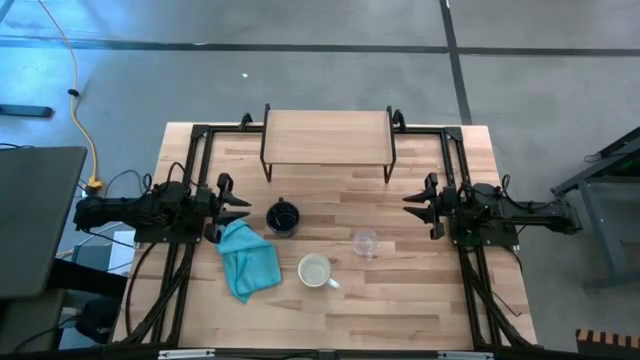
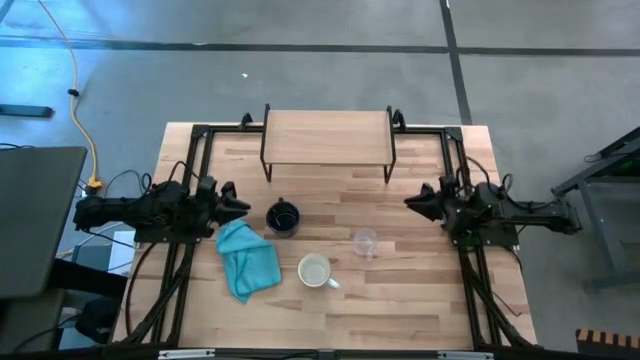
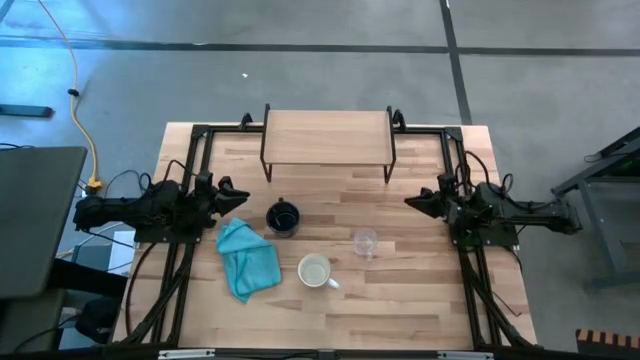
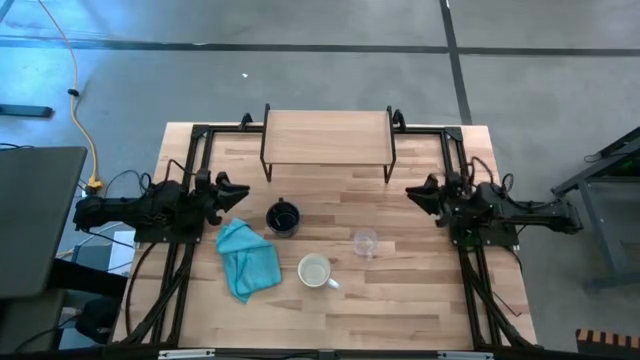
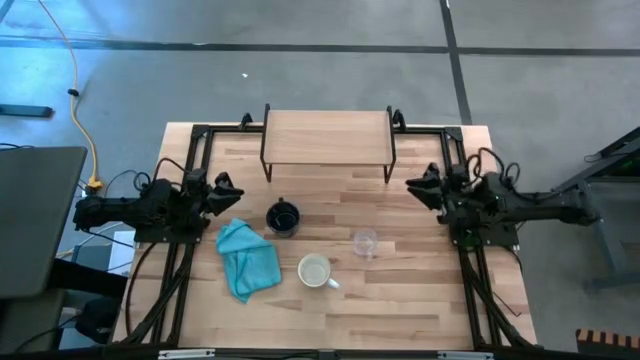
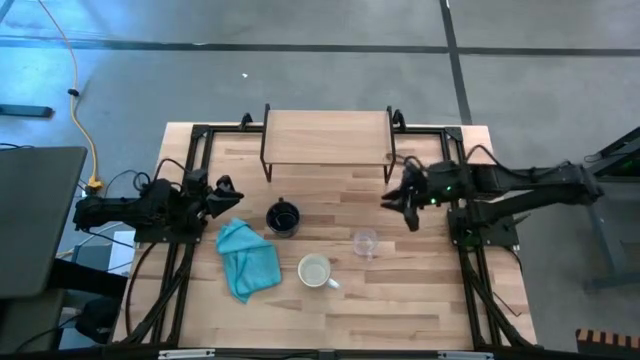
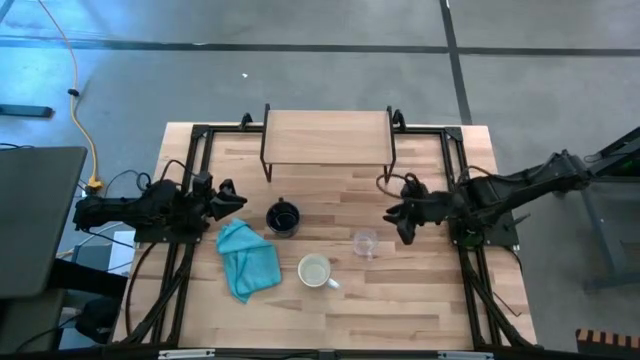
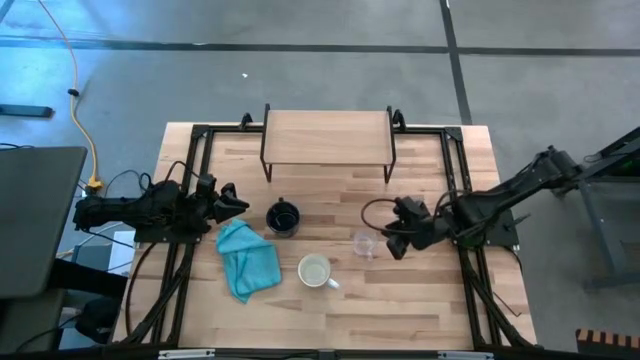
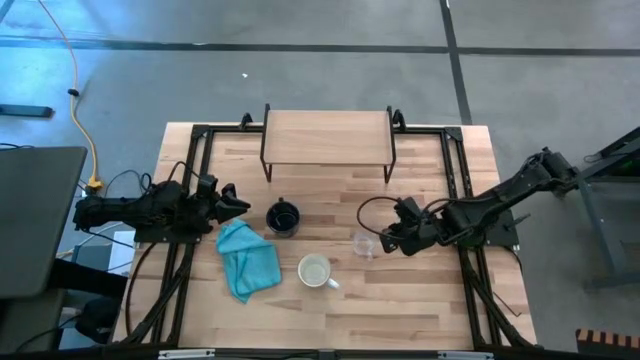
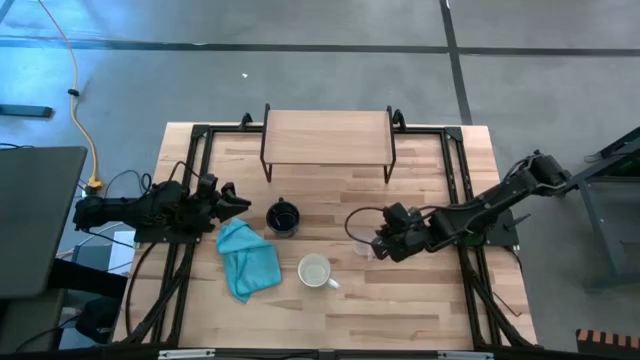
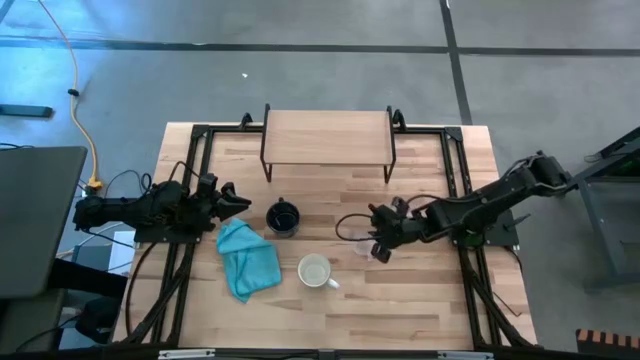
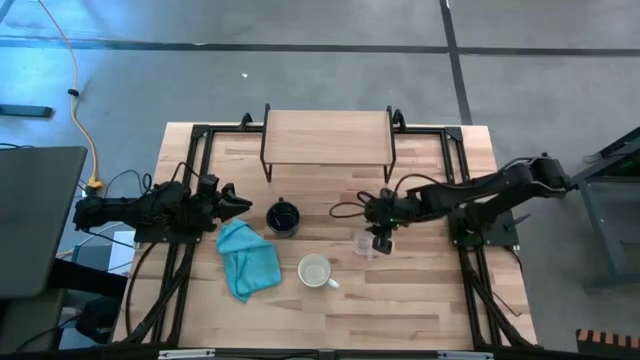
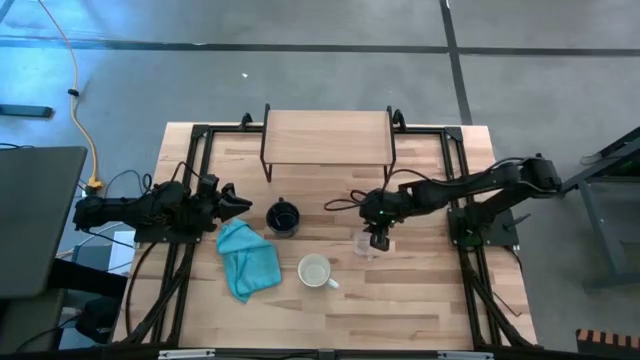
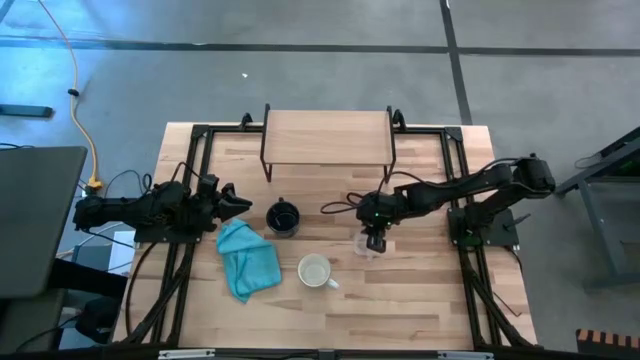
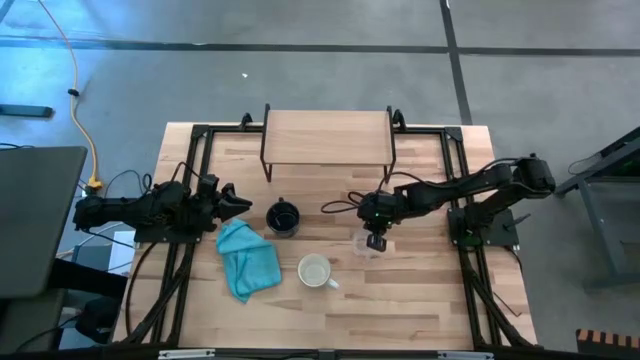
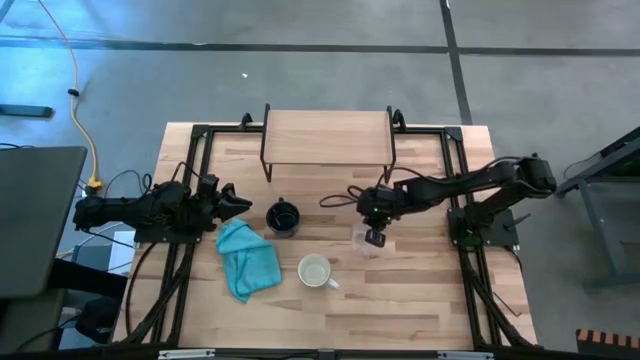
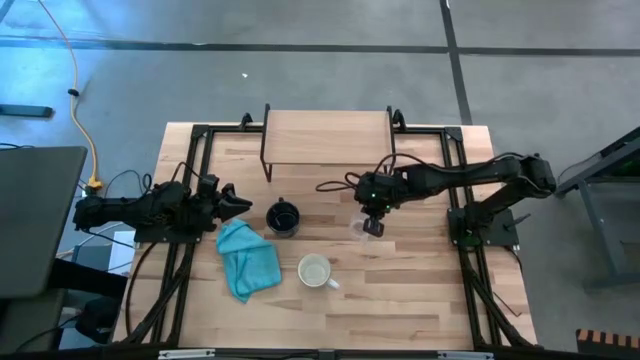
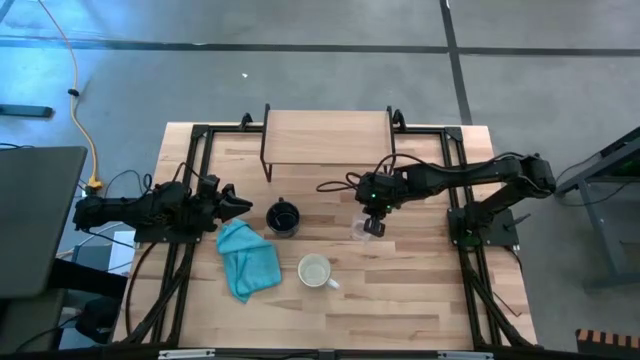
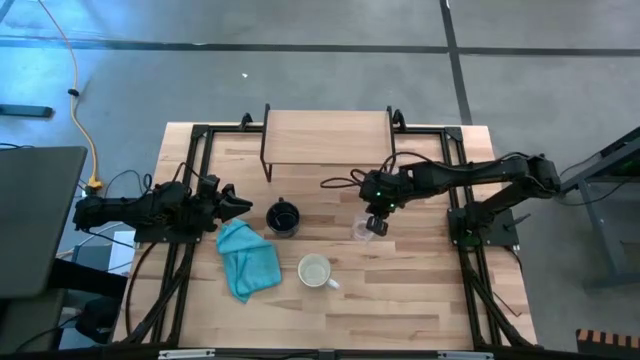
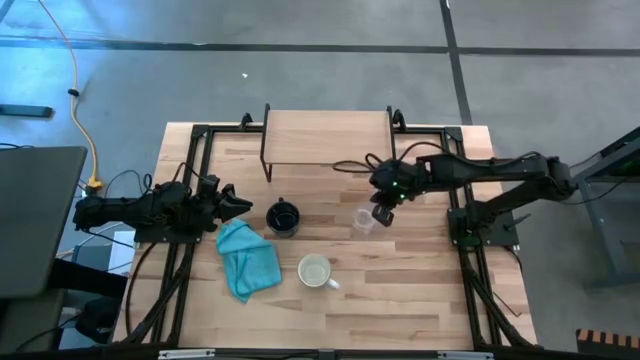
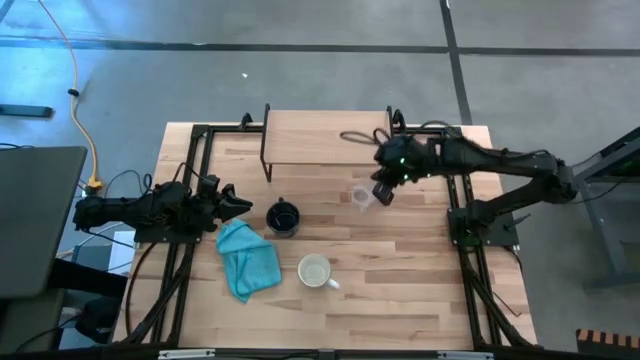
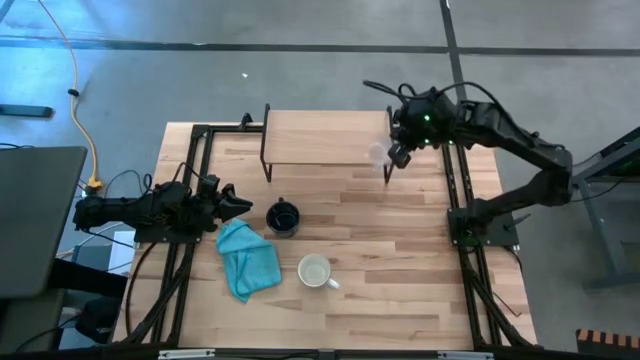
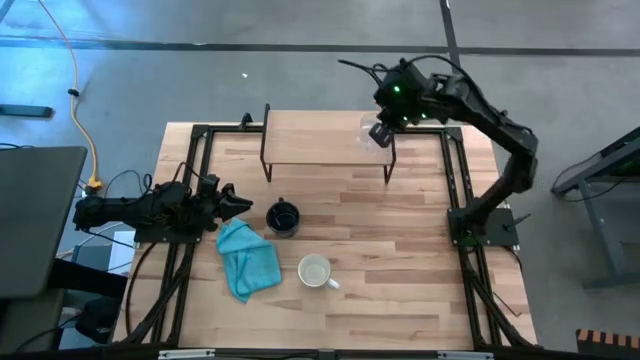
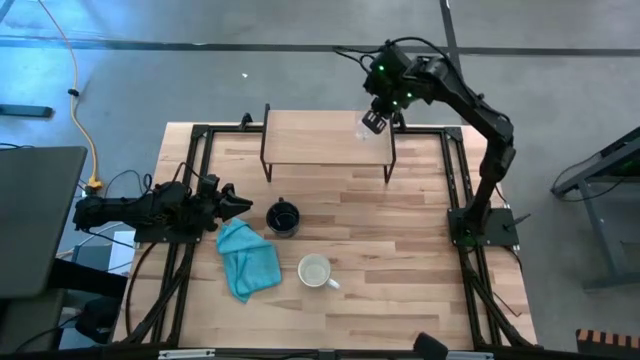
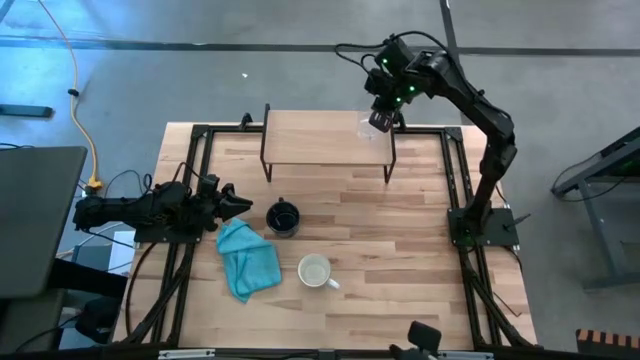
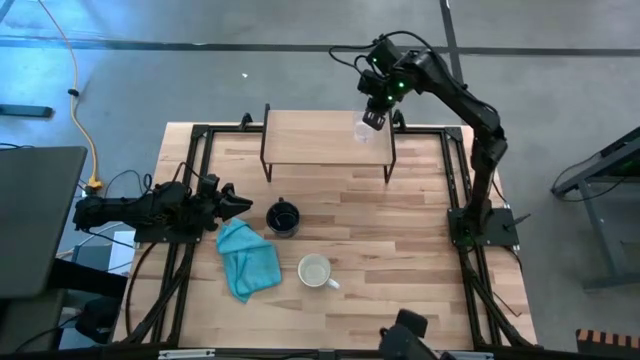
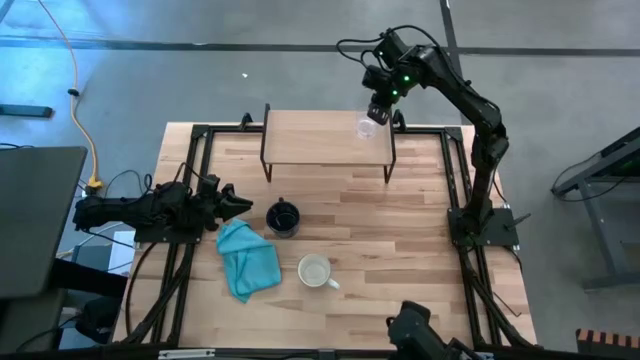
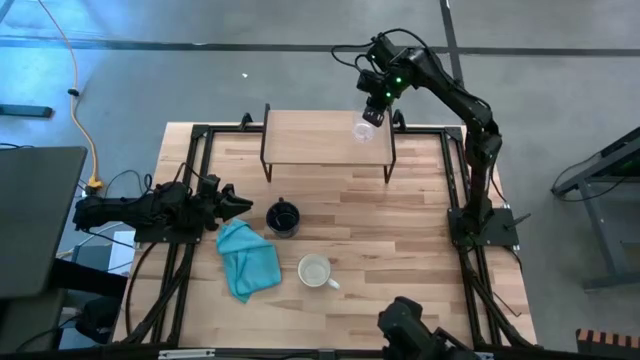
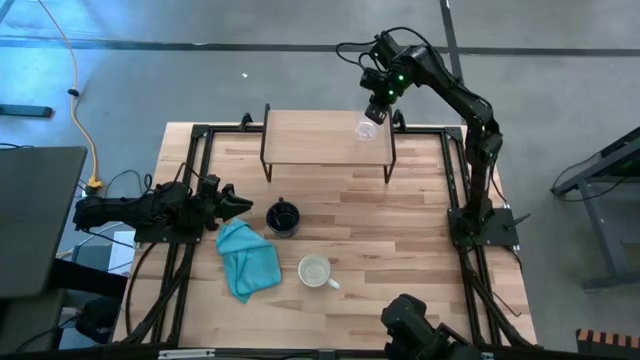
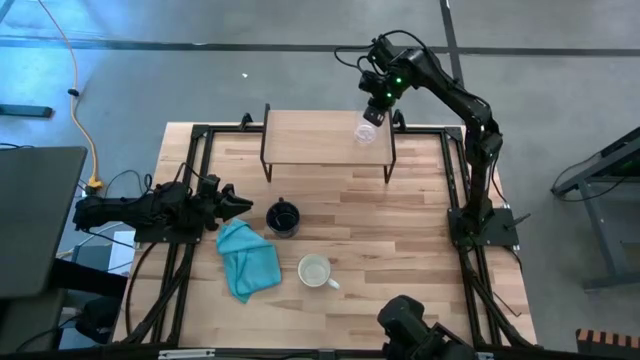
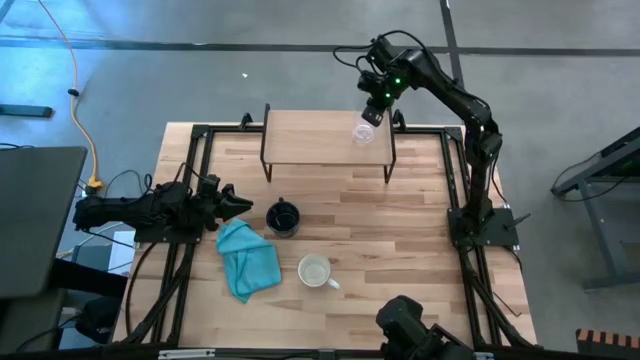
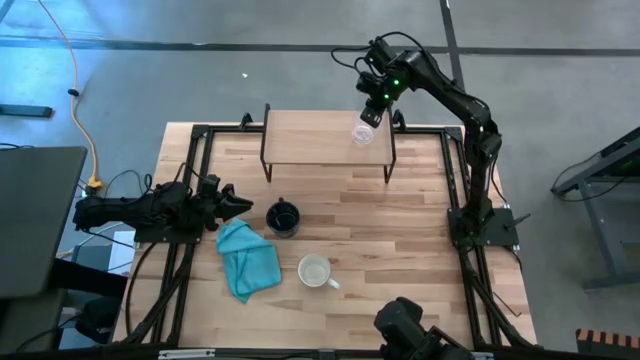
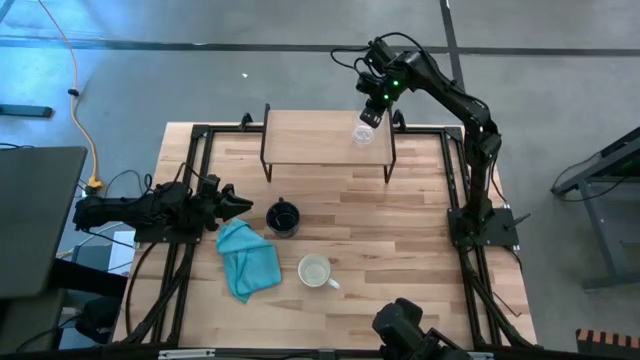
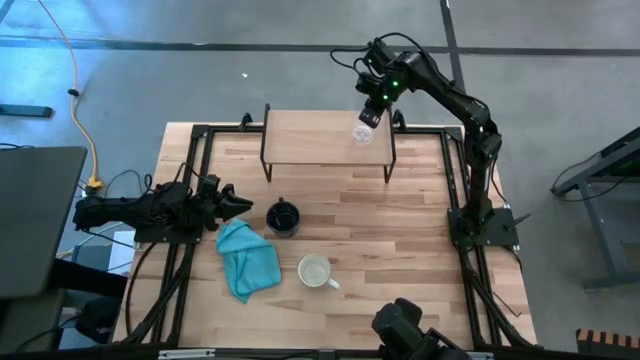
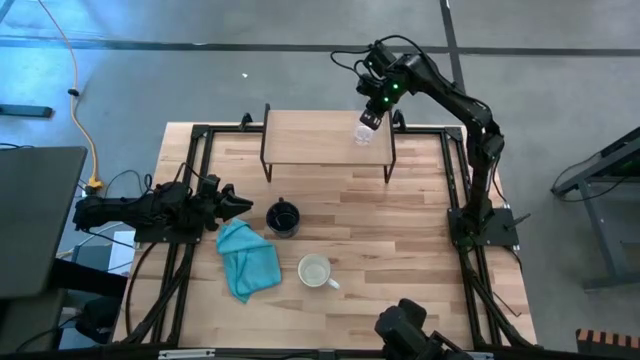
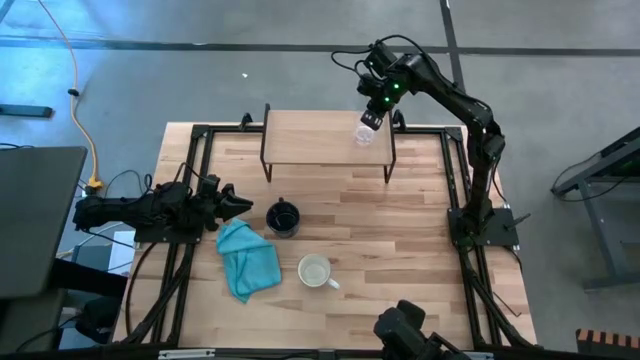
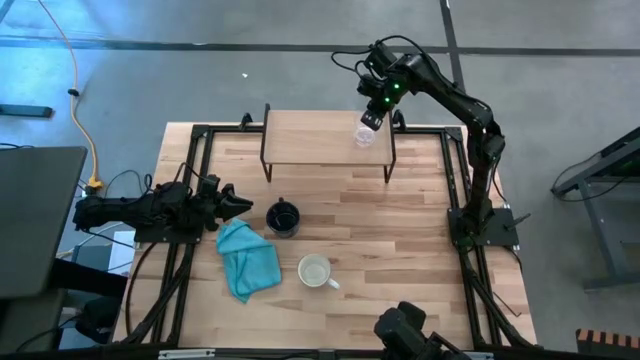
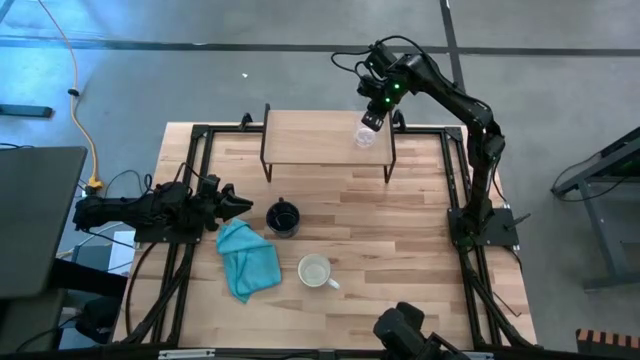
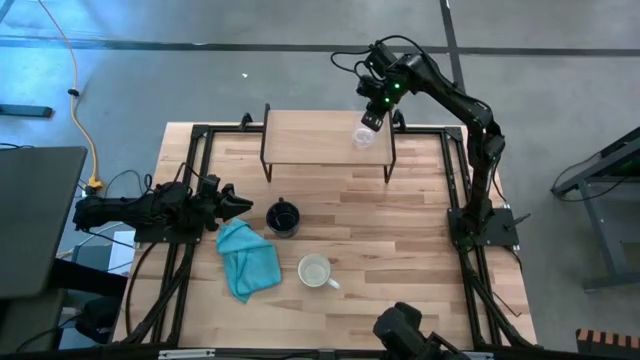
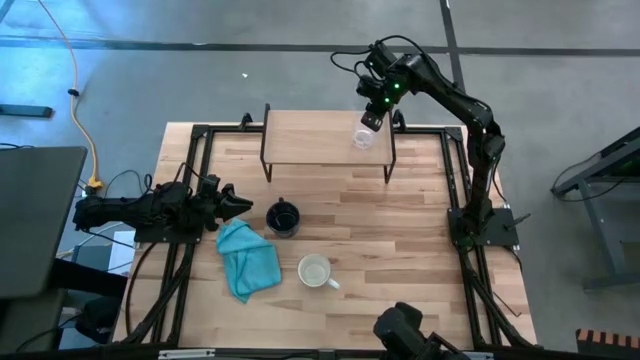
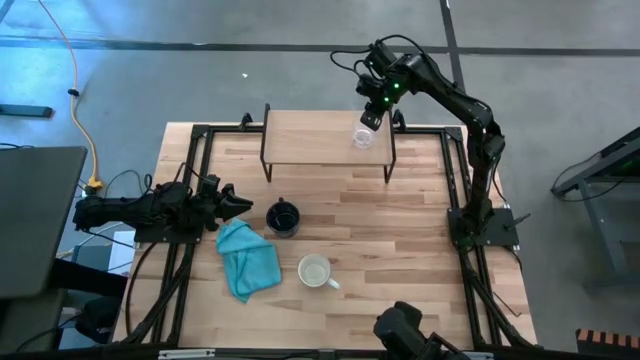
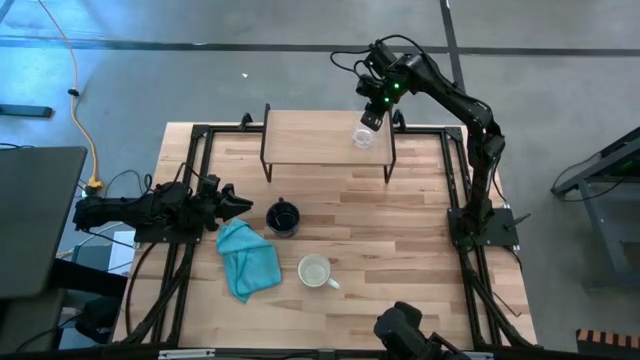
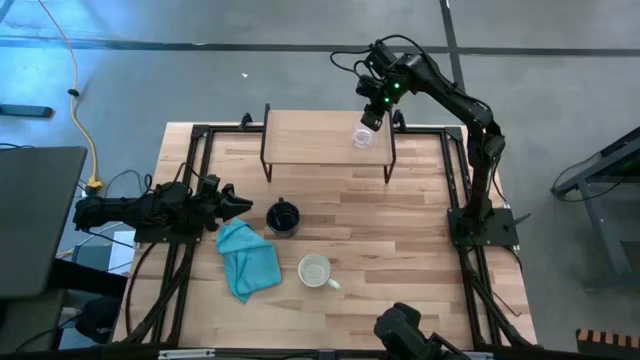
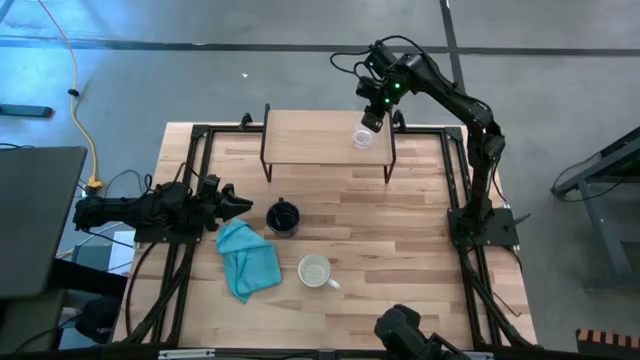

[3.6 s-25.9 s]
Task: Stack small to large cups/mugs on shelf
Put the transparent mug on the shelf
